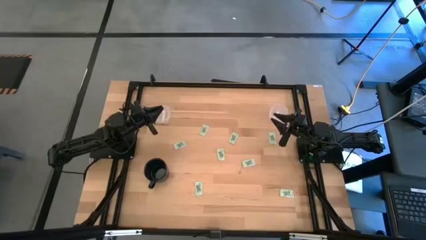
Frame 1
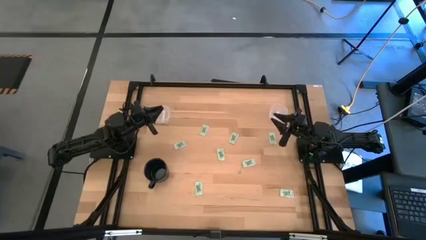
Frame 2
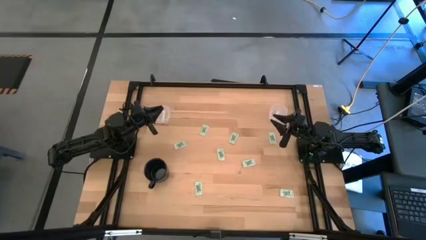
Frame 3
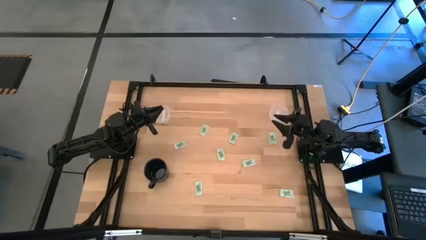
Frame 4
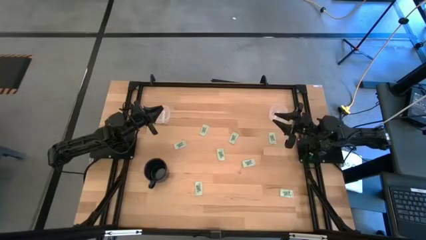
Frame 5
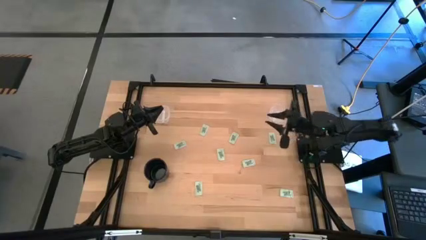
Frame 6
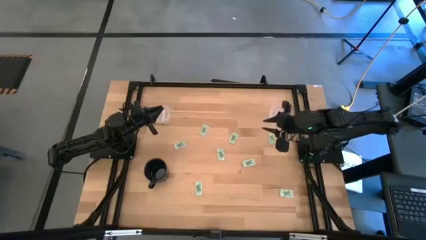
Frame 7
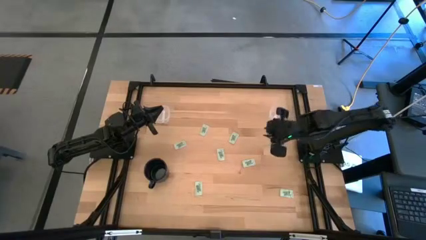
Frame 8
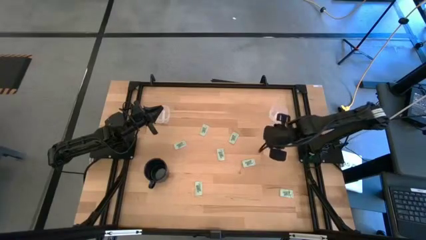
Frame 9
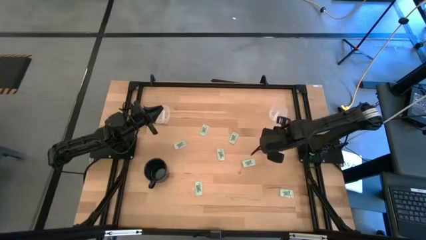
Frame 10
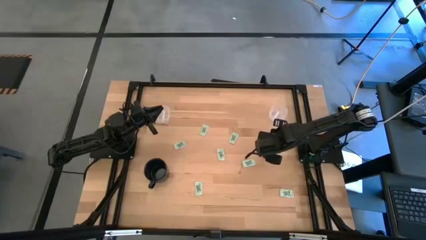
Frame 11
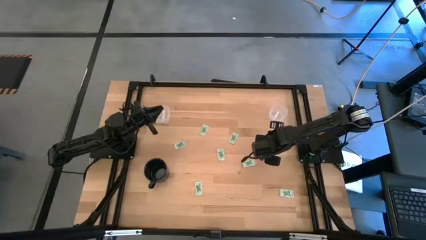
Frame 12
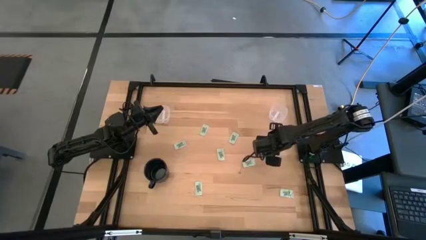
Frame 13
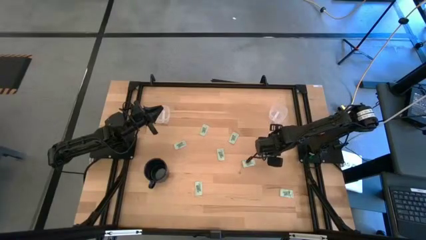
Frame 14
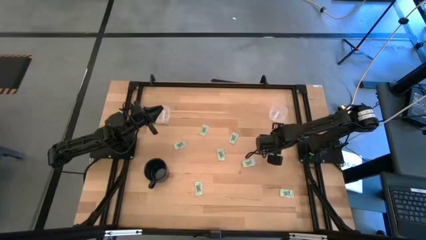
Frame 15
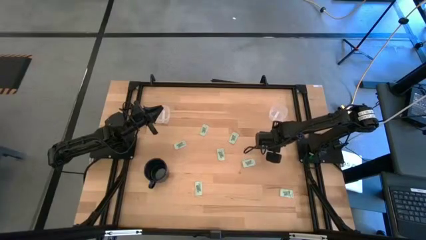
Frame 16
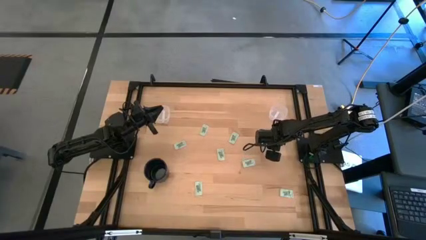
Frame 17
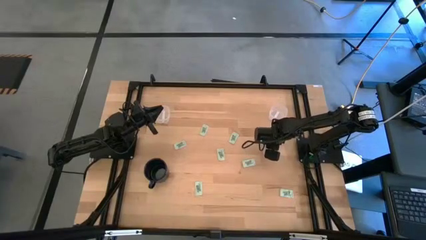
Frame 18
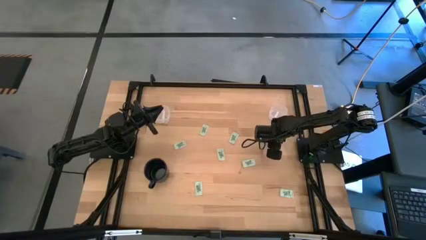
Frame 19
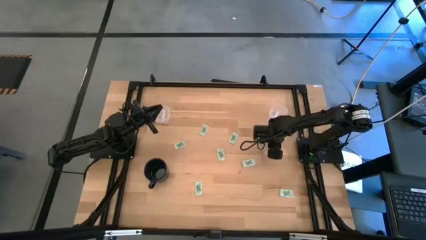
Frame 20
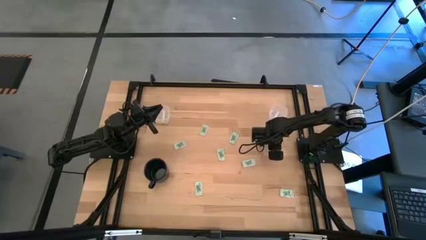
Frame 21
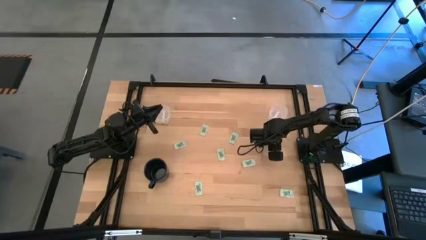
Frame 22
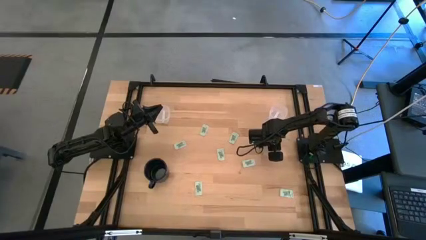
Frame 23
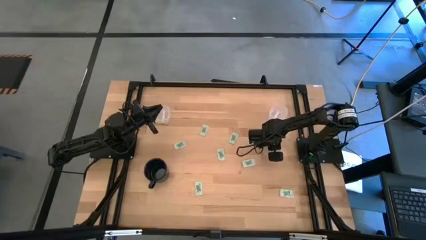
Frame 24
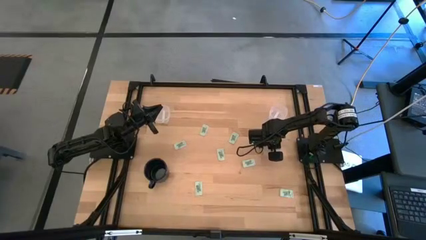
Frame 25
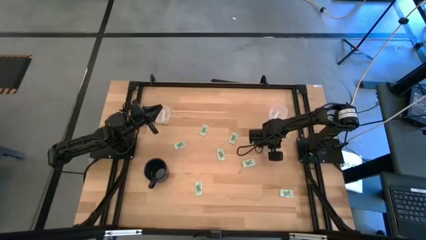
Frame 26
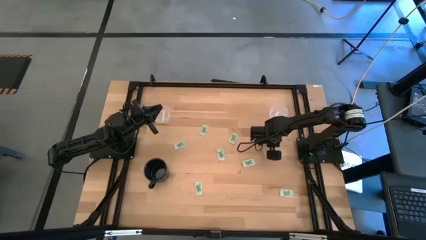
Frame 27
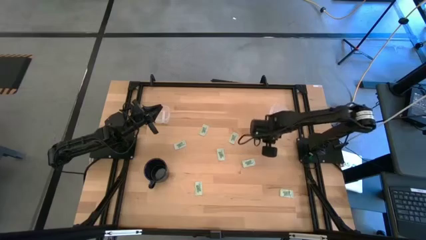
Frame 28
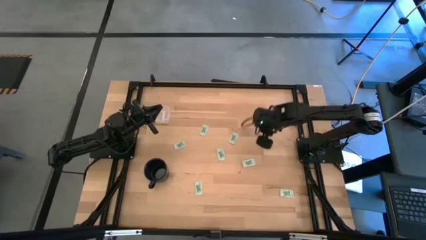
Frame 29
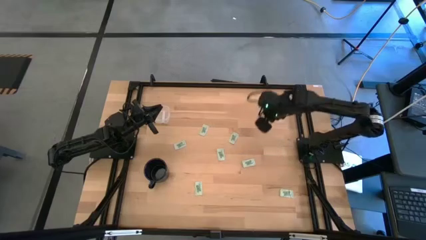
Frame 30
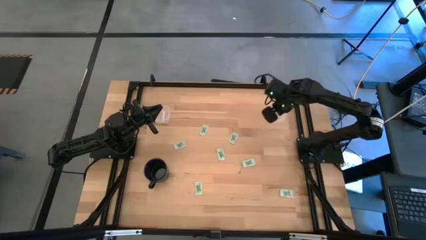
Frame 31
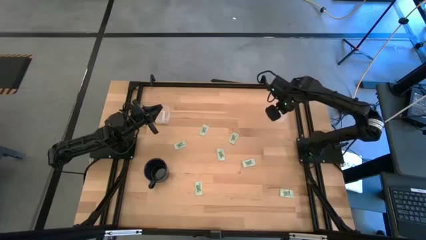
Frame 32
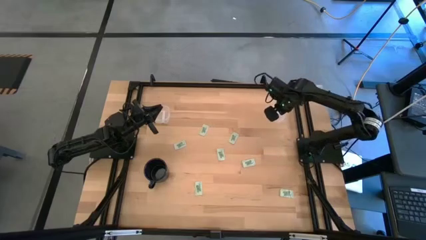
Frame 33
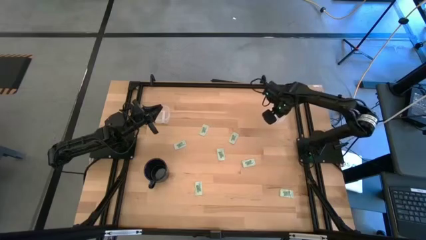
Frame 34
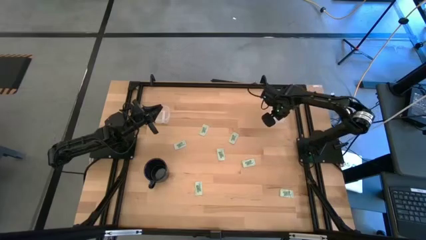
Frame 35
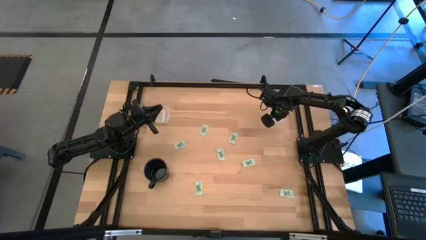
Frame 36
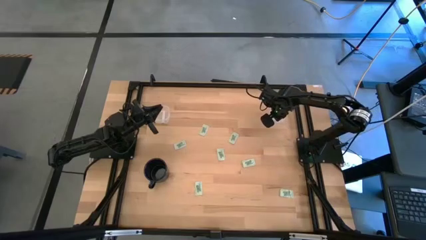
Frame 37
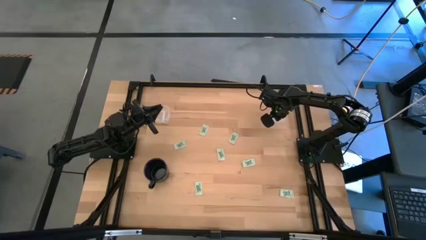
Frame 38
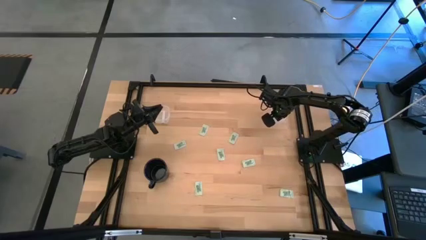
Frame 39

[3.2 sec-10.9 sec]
Task: Pick and place Stevia / Truvia into bins
Put the stevia packet into the right transparent container

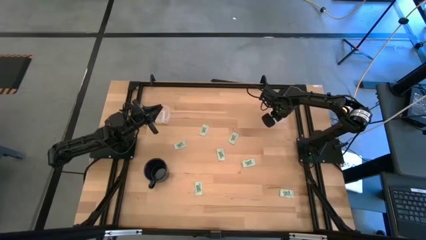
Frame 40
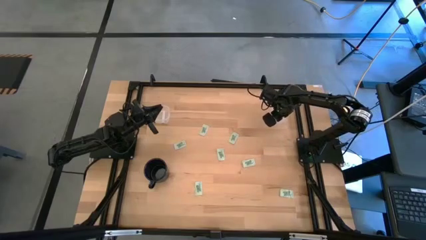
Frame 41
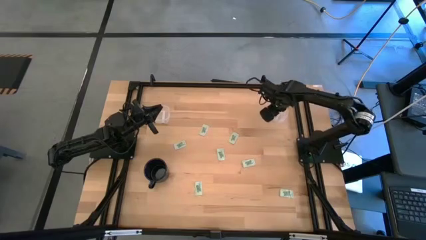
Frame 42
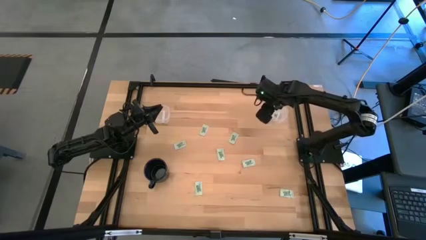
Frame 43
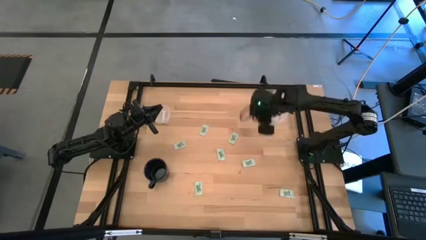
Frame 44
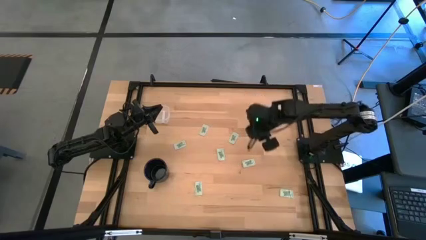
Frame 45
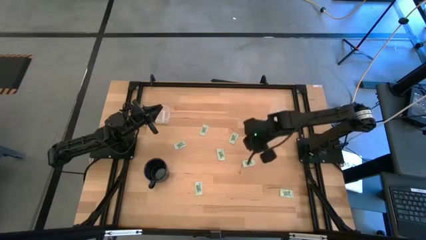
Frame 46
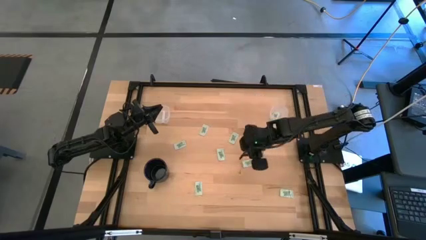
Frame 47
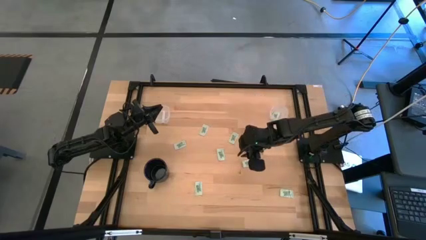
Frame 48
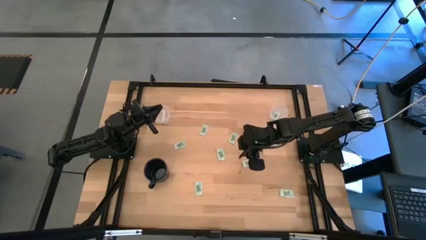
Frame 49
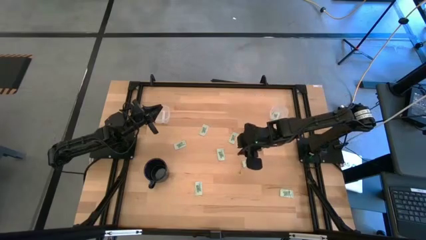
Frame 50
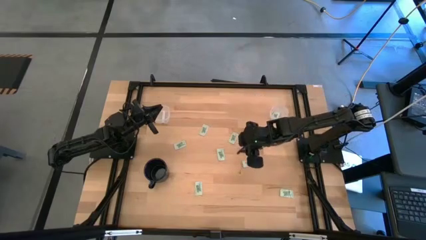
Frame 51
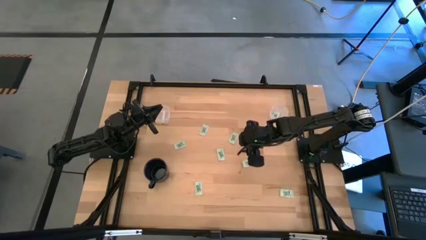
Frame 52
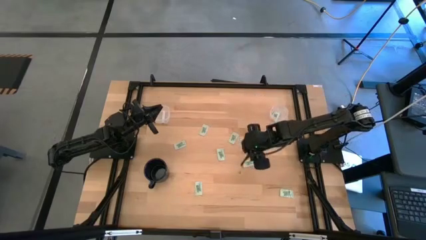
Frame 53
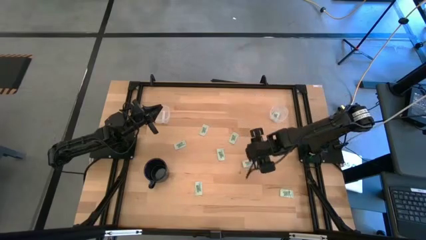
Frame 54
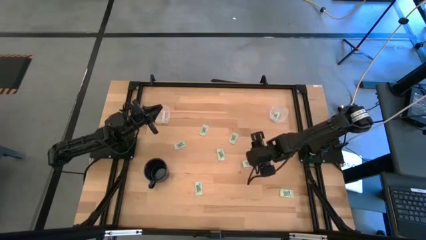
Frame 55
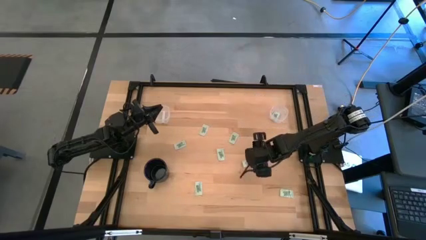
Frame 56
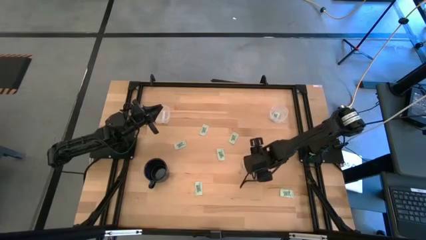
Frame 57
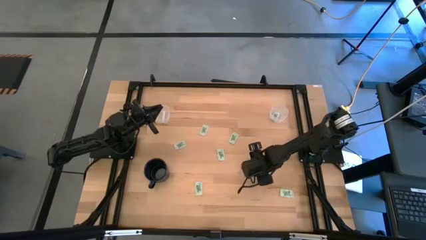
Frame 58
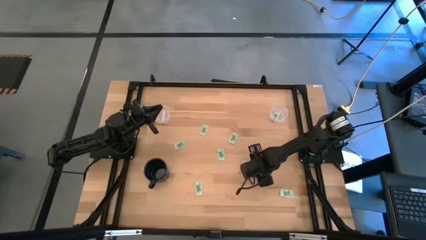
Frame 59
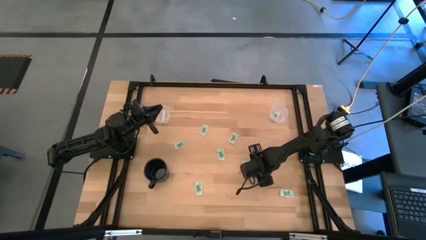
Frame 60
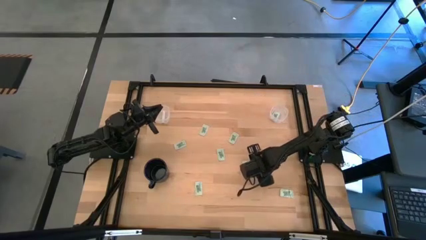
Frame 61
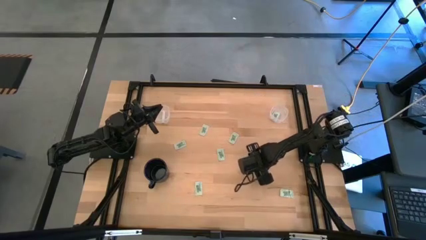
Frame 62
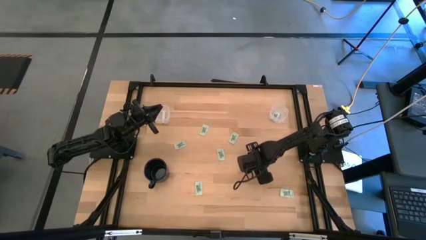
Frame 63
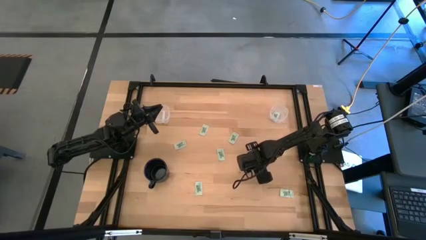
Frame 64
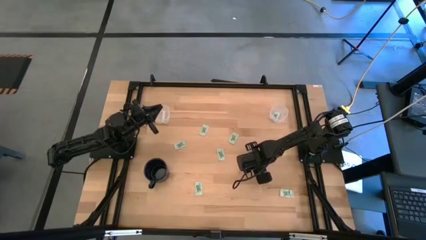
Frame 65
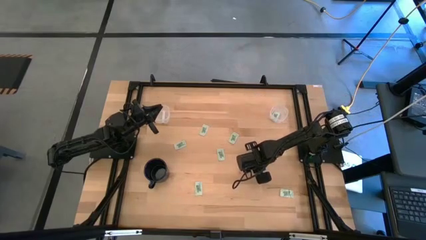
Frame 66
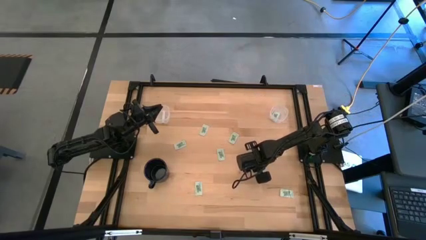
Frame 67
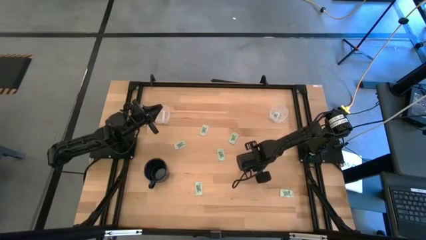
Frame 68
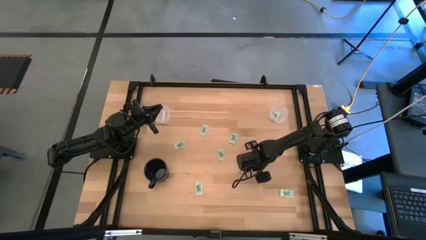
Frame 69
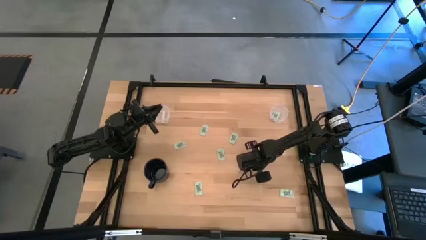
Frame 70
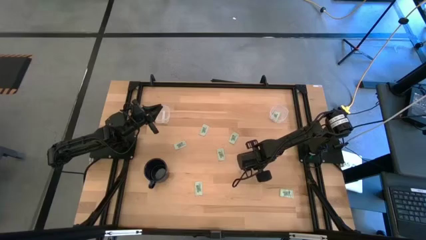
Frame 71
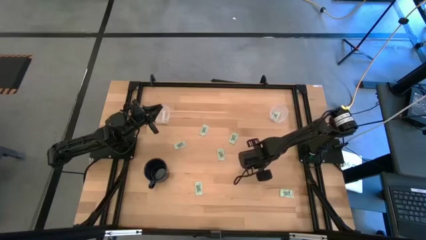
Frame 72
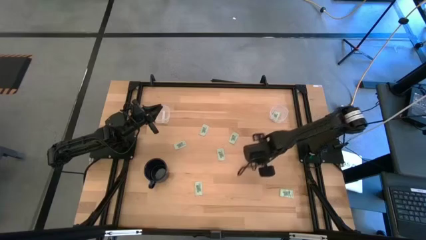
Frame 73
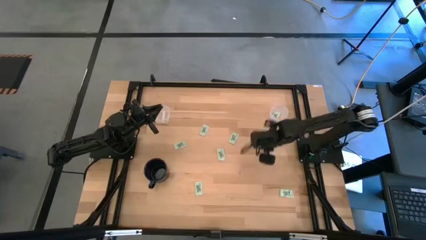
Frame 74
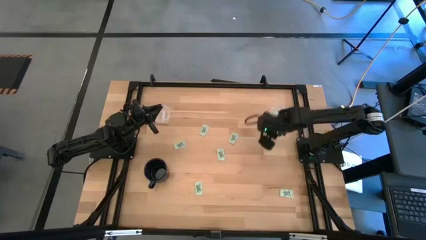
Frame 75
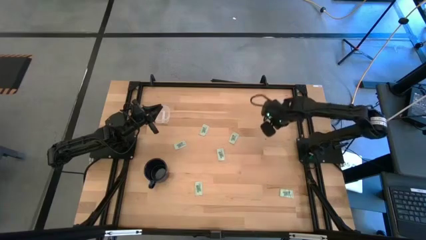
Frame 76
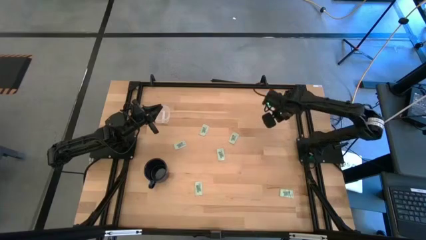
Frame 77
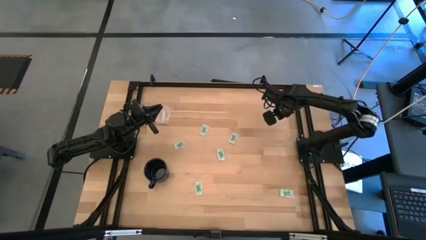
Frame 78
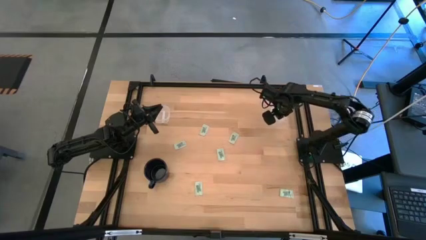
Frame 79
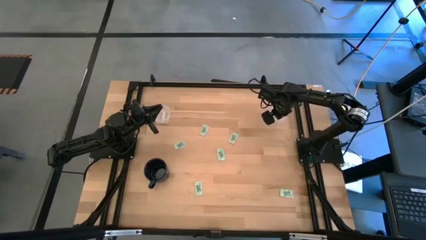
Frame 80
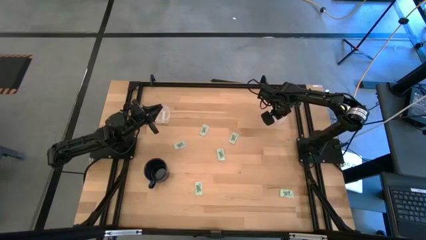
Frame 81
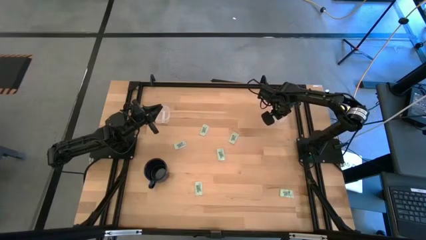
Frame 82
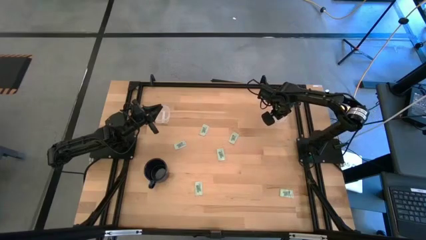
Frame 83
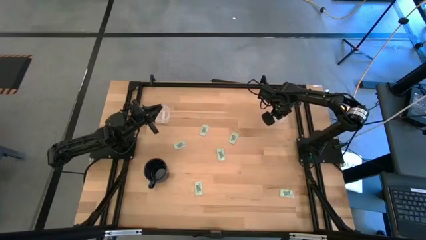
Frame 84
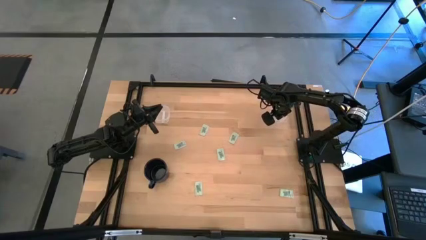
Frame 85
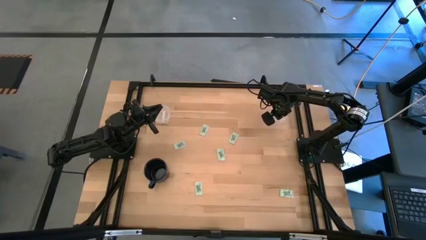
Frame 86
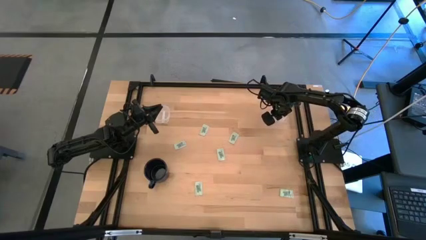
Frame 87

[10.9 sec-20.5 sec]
Put the stevia packet into the right transparent container
